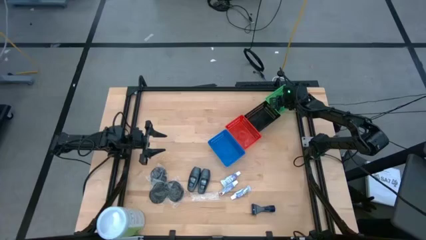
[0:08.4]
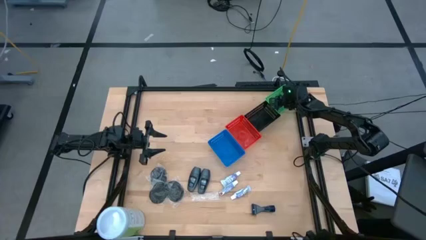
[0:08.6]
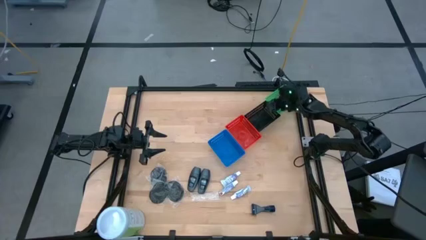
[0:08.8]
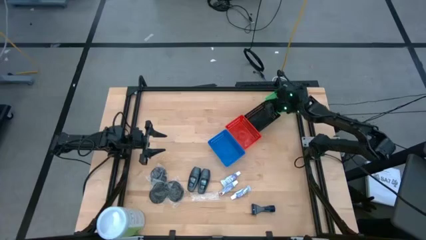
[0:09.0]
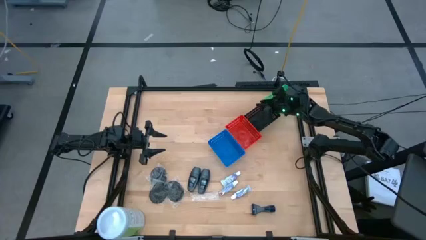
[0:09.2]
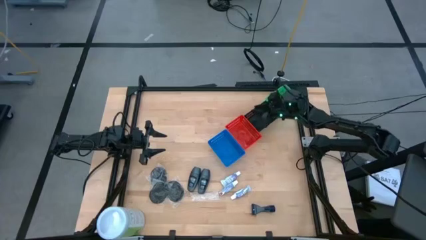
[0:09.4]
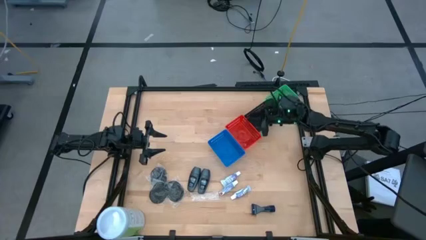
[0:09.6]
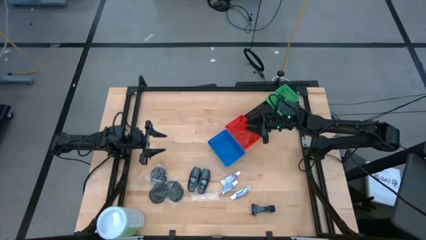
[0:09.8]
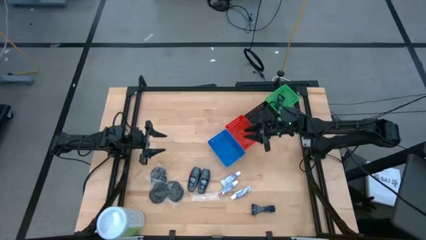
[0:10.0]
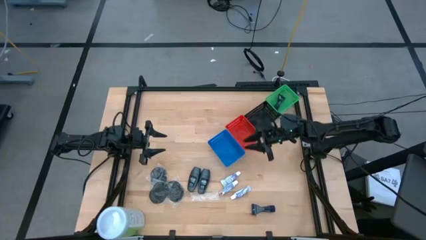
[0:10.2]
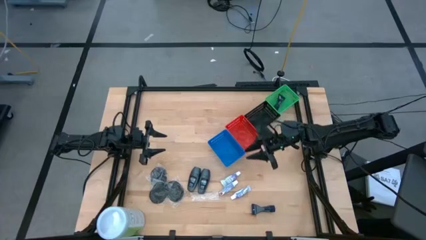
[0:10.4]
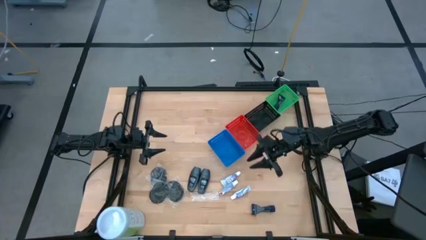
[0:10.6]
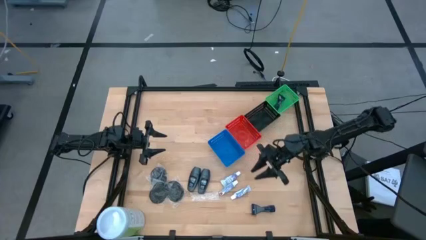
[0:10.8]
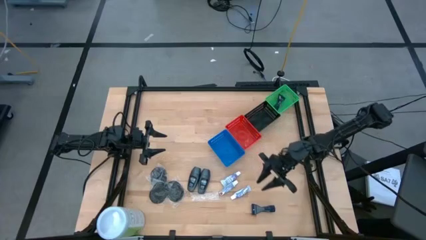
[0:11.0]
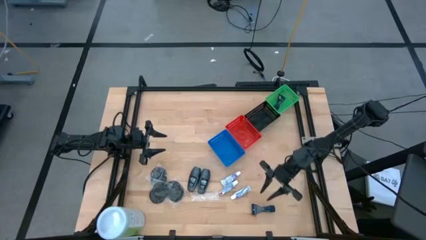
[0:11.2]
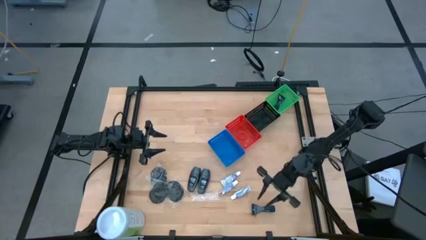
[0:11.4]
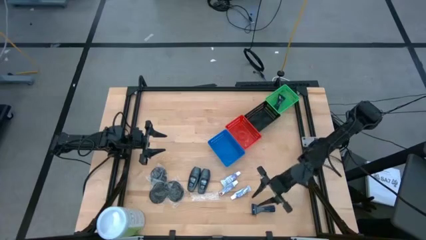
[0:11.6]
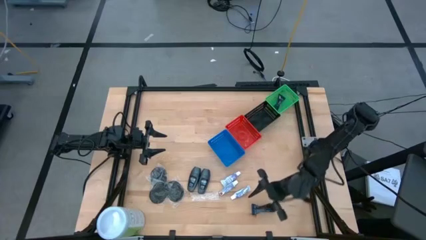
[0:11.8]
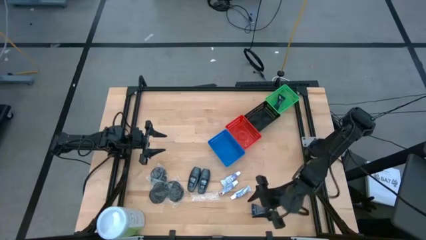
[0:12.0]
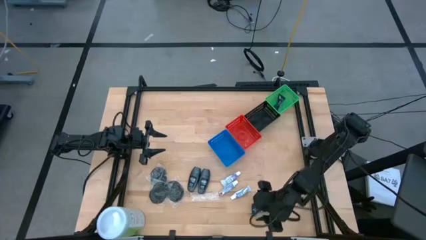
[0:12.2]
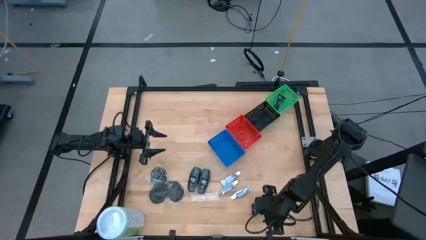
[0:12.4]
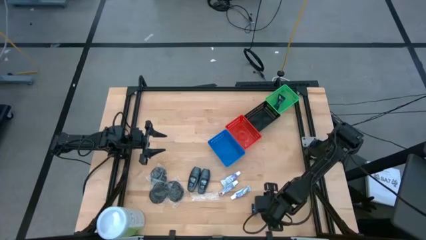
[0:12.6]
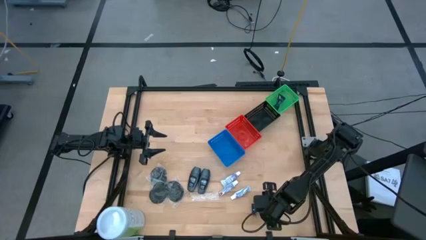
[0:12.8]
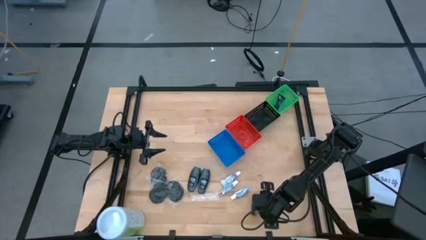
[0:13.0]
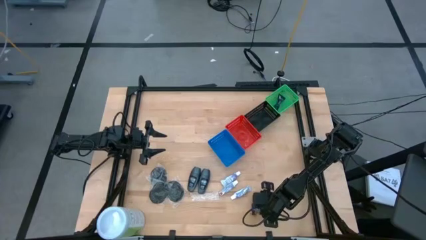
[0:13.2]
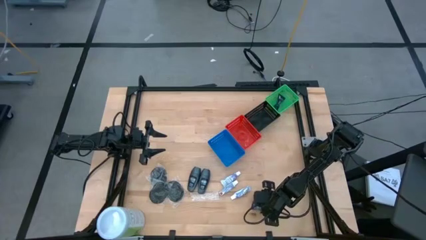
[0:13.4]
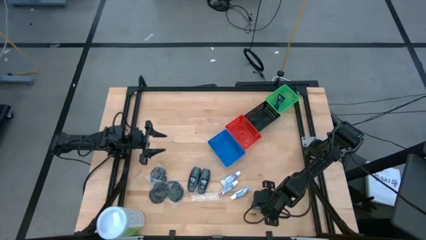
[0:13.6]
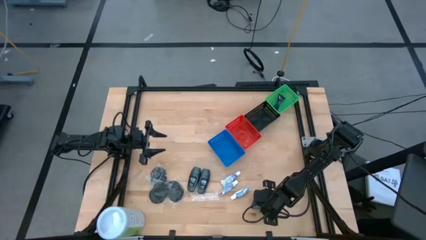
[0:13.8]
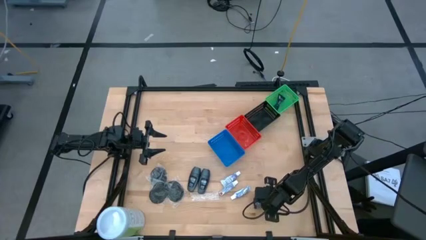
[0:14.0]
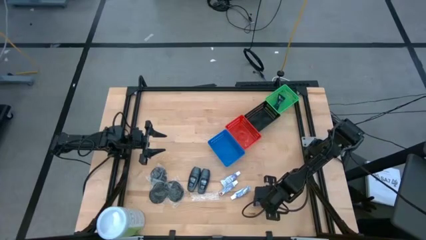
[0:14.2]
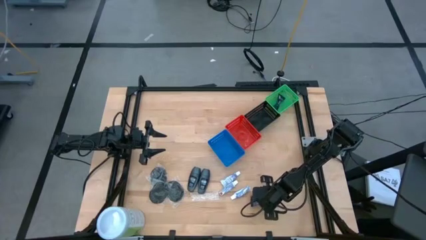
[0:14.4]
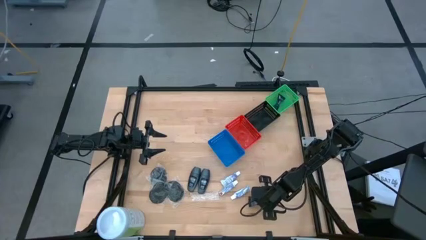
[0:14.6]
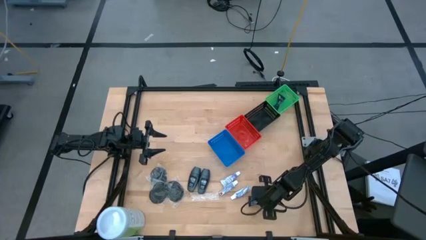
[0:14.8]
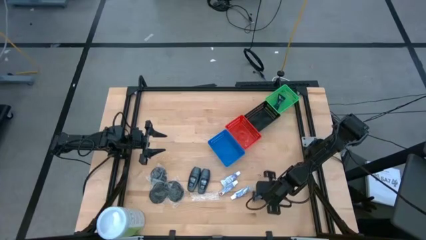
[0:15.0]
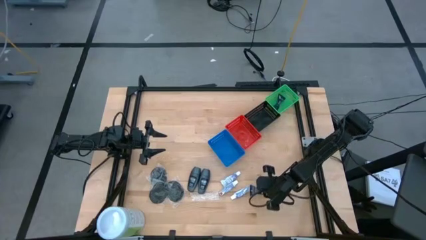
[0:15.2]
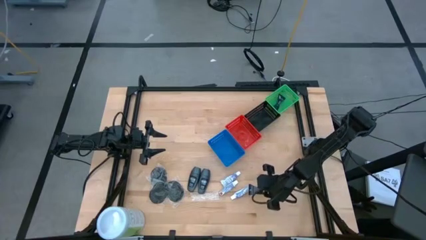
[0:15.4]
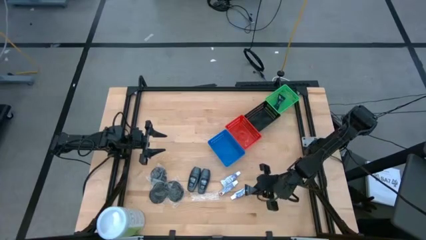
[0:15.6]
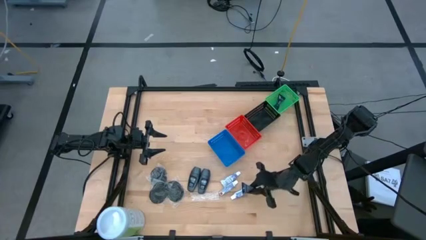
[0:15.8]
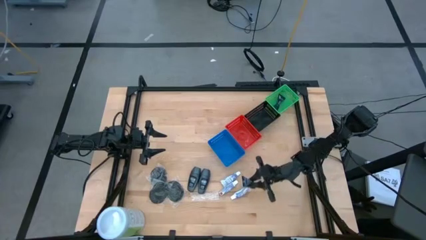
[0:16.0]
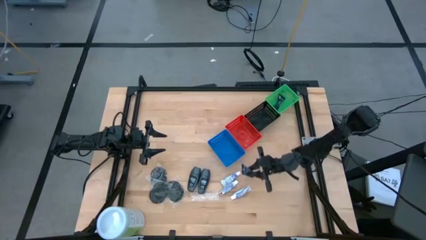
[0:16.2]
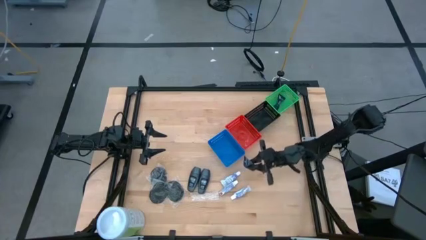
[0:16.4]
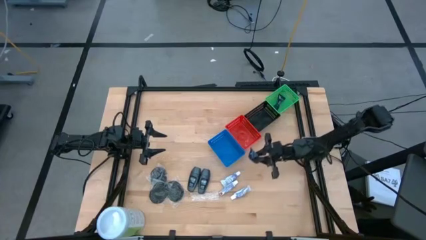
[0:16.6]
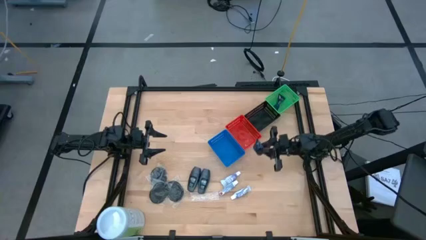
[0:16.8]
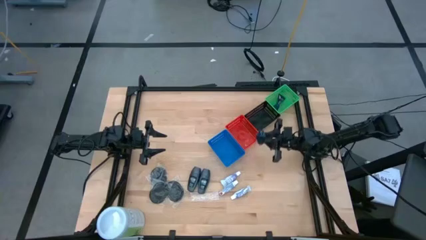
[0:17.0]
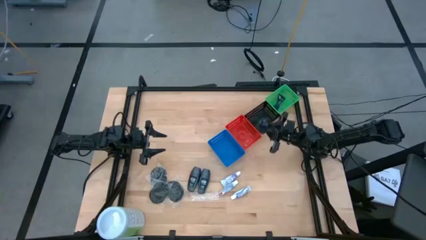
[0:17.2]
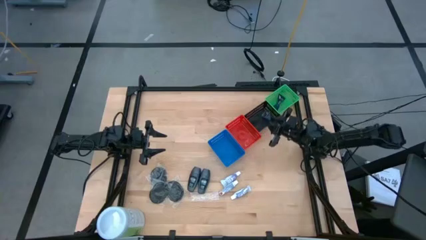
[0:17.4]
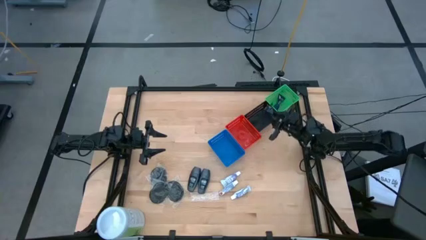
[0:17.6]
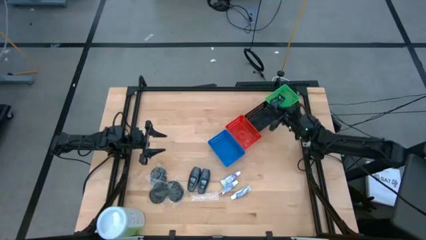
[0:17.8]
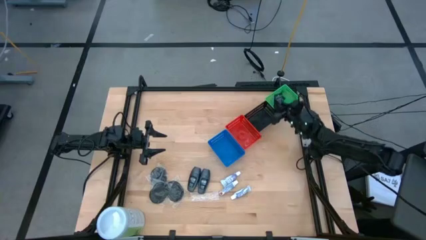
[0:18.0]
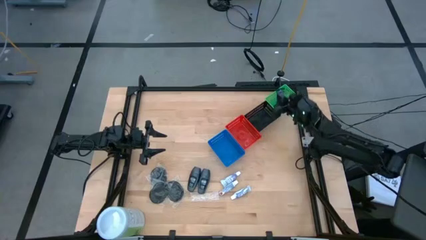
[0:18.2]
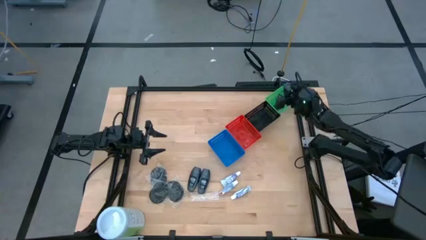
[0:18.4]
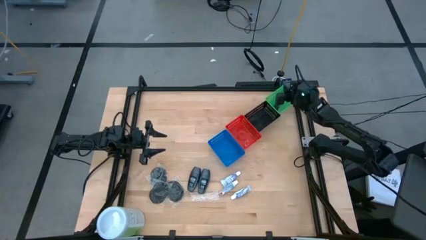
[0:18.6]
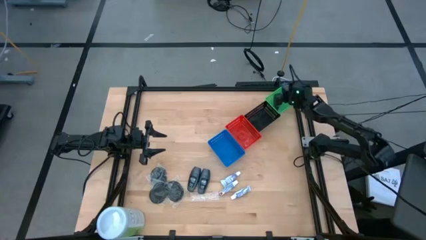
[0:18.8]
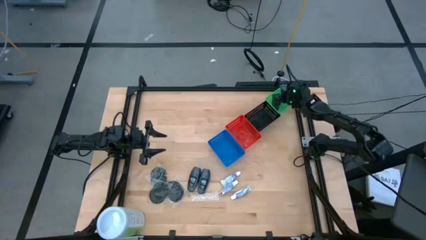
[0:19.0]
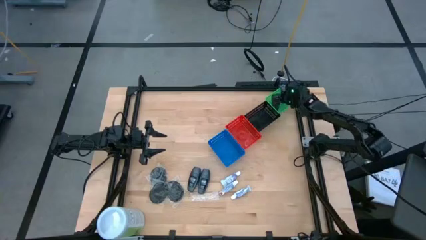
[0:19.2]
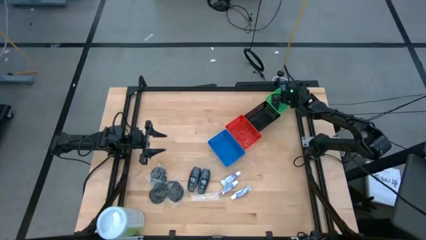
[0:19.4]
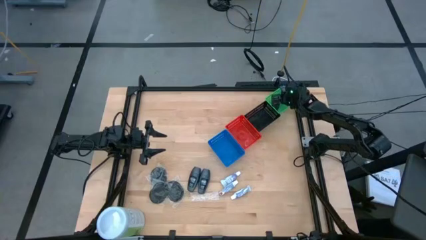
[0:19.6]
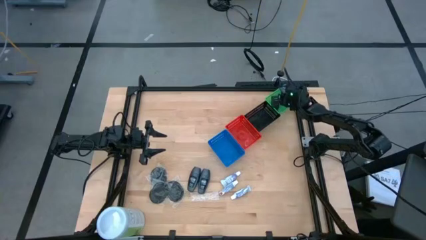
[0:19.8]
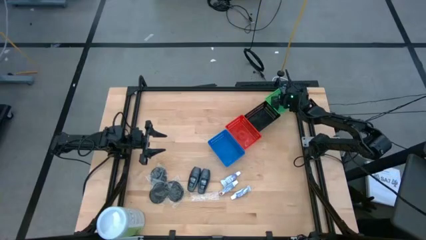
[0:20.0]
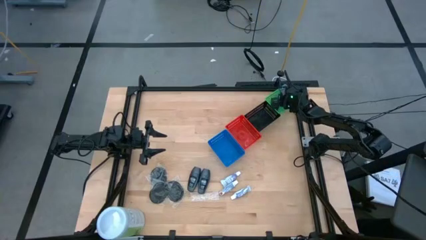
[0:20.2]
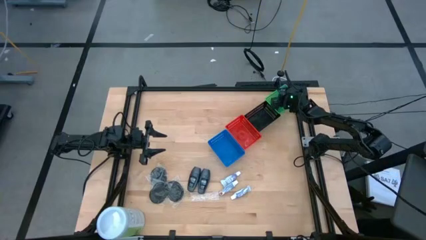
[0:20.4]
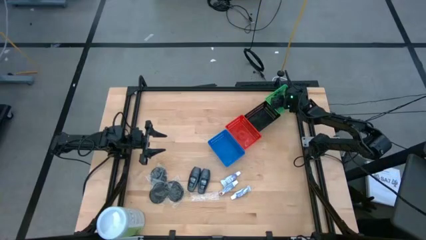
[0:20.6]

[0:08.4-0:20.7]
Task: Pick & Place Travel size toiletries
Put the shave cream into the green bin
